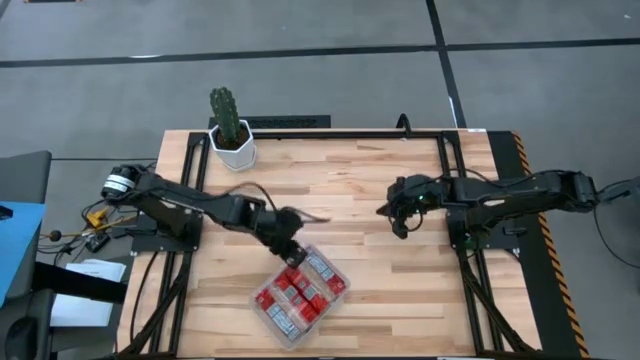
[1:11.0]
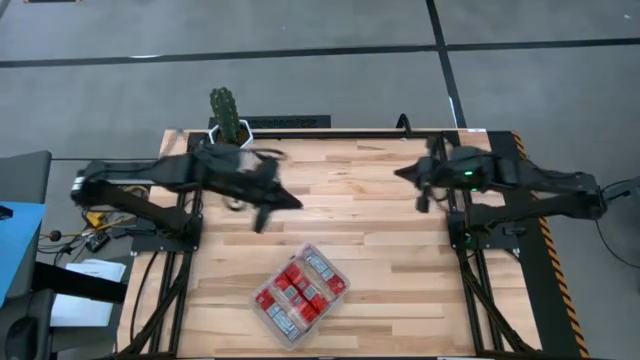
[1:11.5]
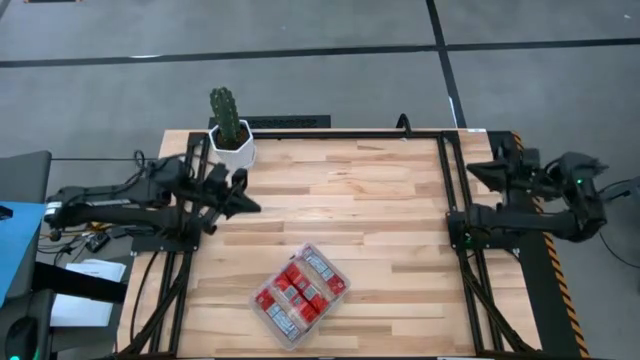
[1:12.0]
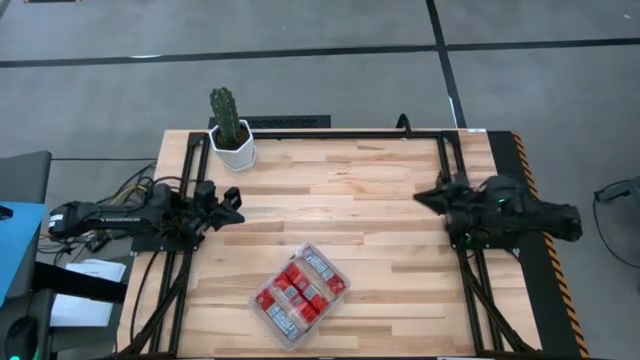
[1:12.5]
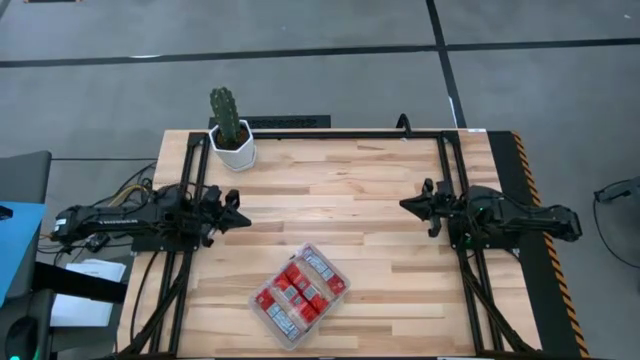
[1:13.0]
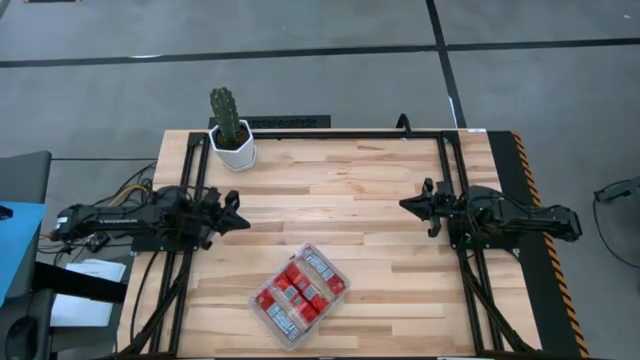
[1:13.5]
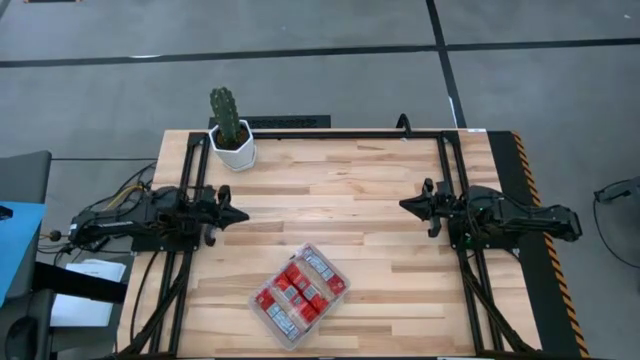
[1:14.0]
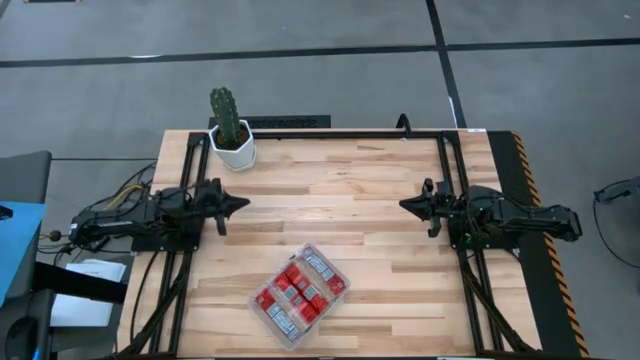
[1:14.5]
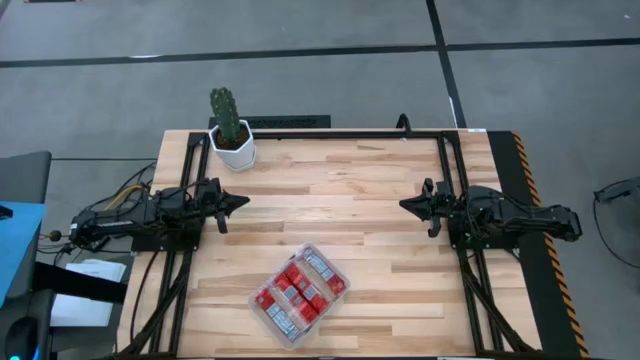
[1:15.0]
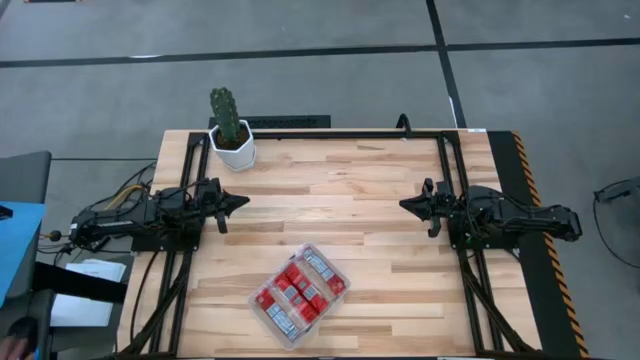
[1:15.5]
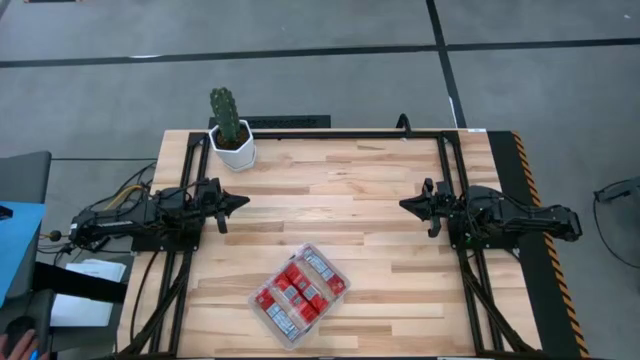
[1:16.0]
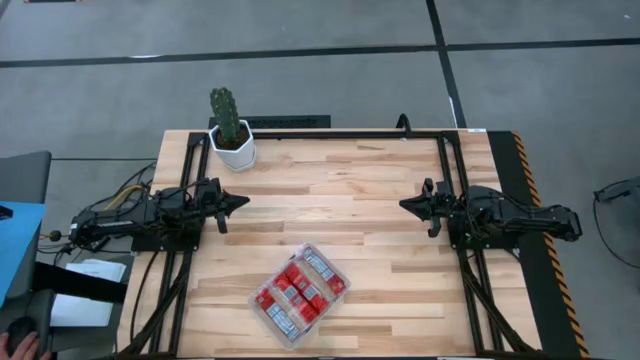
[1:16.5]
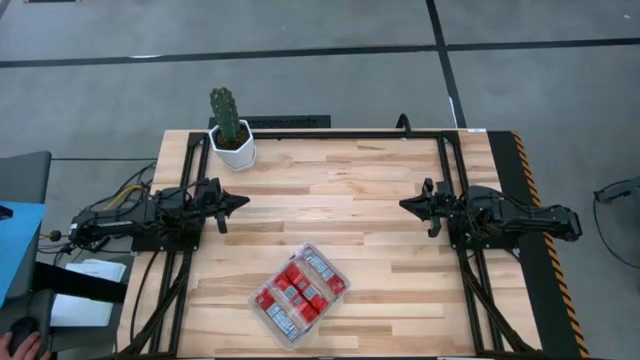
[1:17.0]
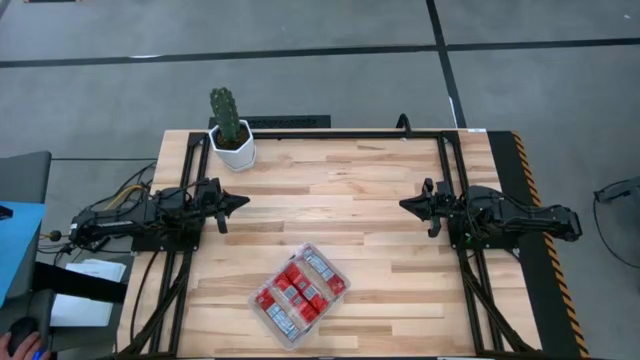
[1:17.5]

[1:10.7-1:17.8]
Task: Sort popcorn bags into baskets
Return to Home Position

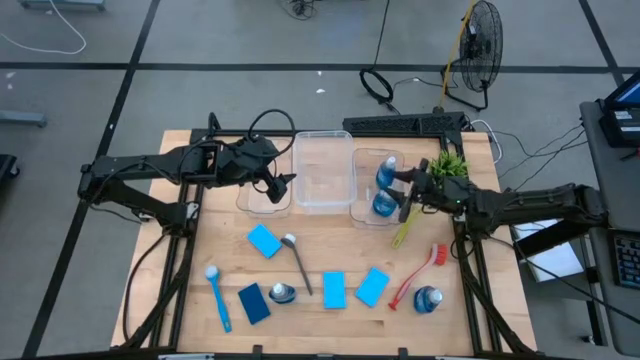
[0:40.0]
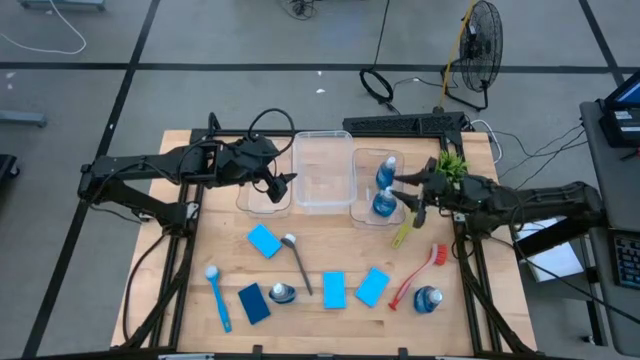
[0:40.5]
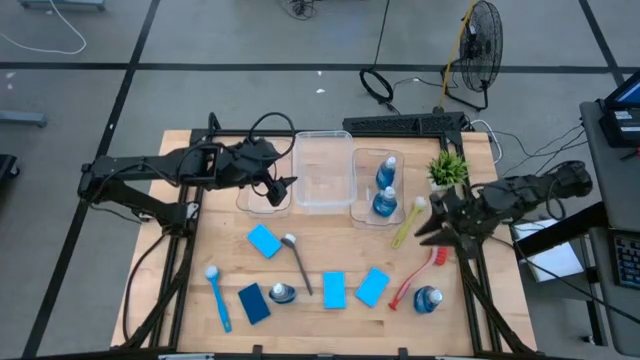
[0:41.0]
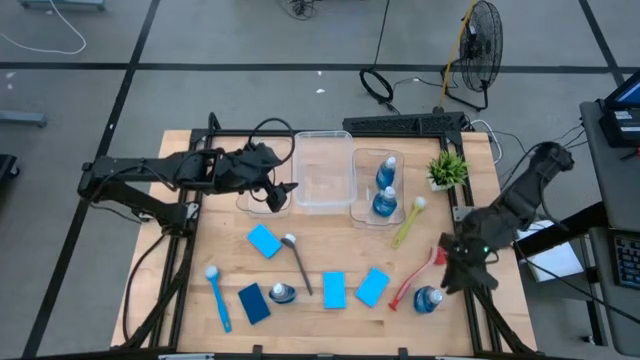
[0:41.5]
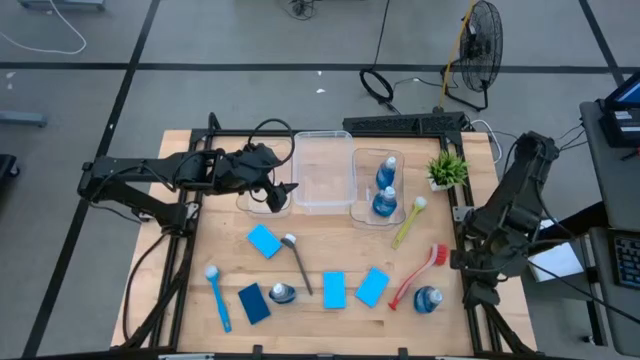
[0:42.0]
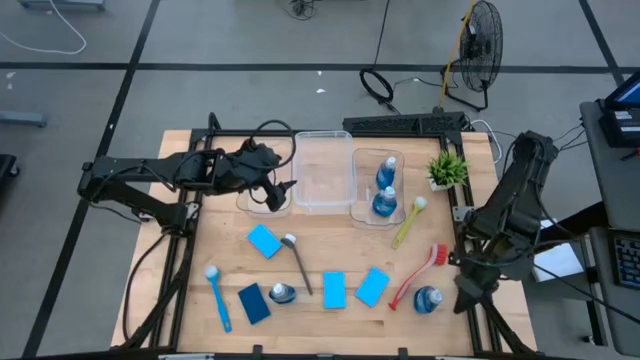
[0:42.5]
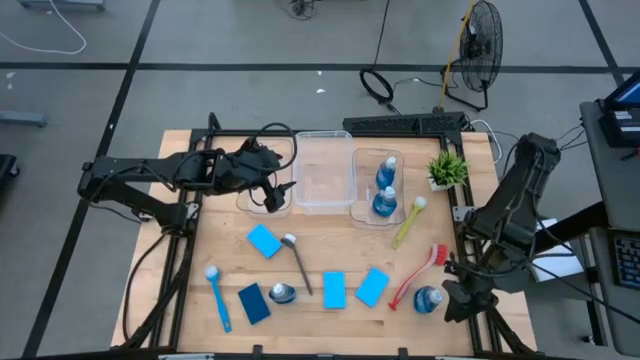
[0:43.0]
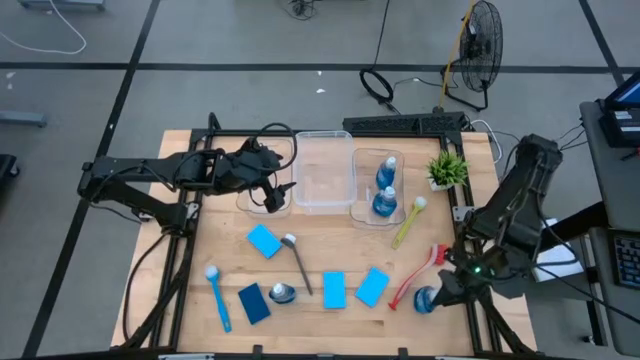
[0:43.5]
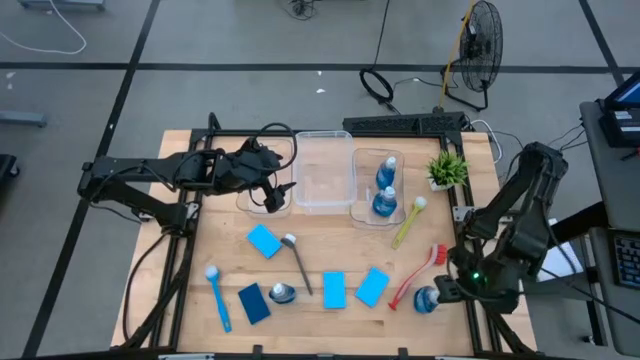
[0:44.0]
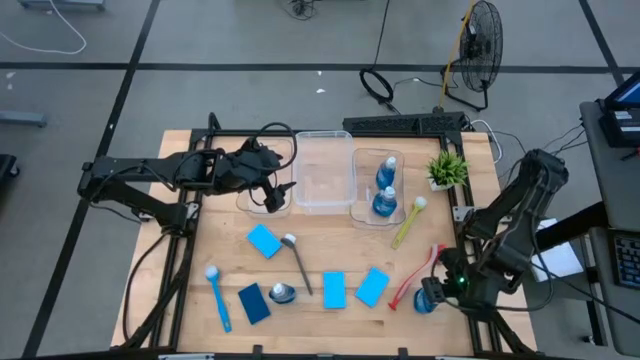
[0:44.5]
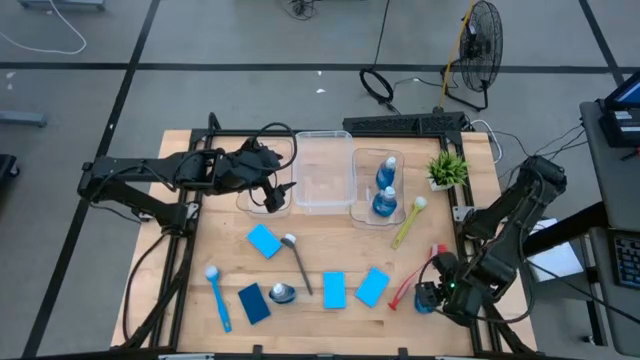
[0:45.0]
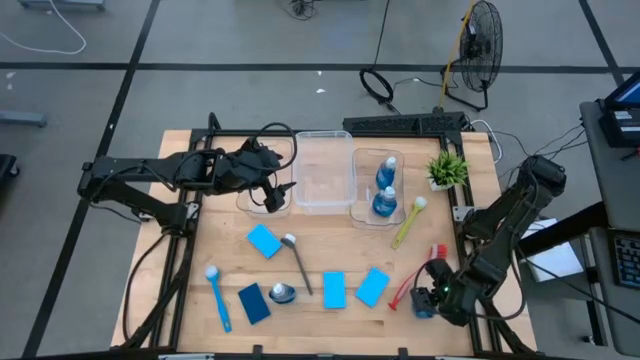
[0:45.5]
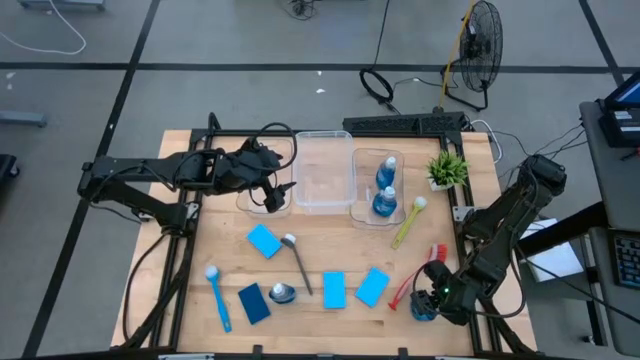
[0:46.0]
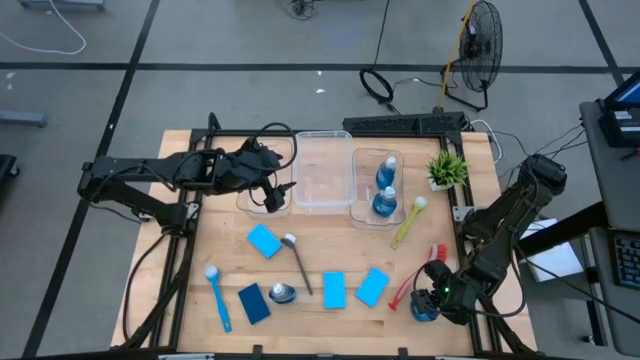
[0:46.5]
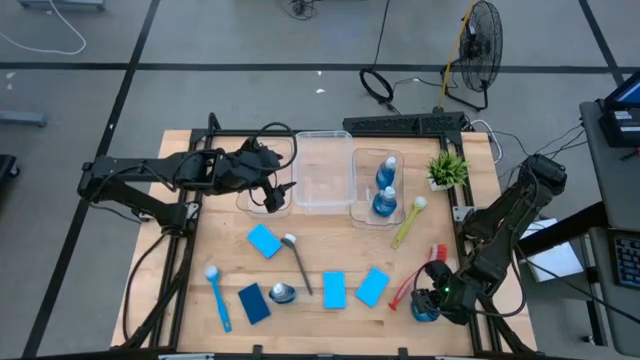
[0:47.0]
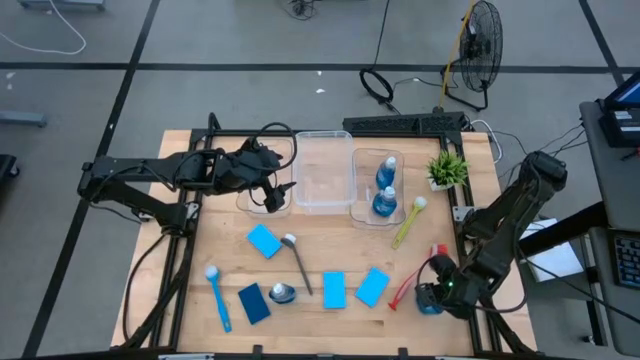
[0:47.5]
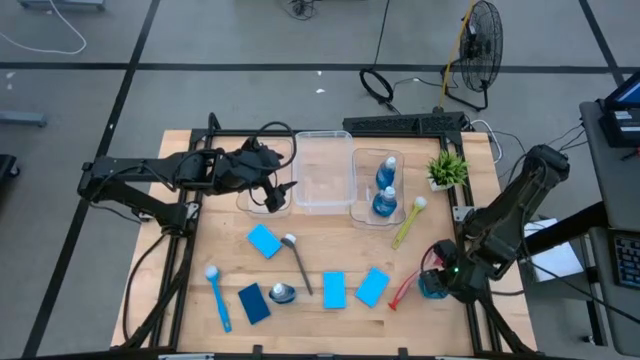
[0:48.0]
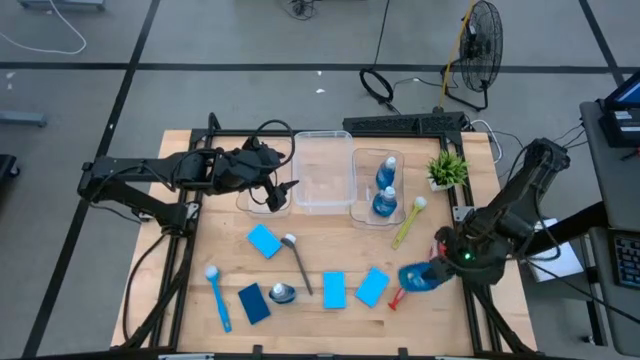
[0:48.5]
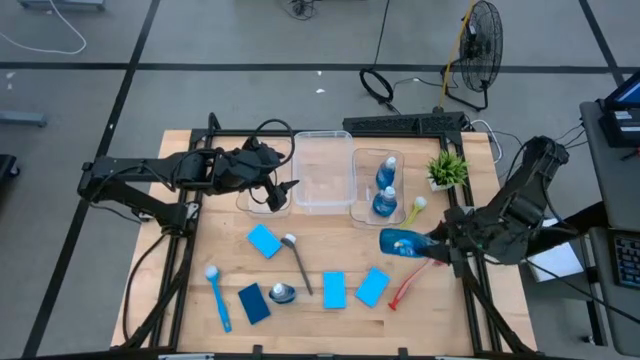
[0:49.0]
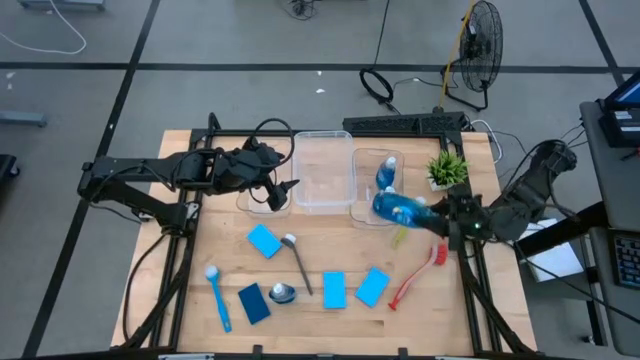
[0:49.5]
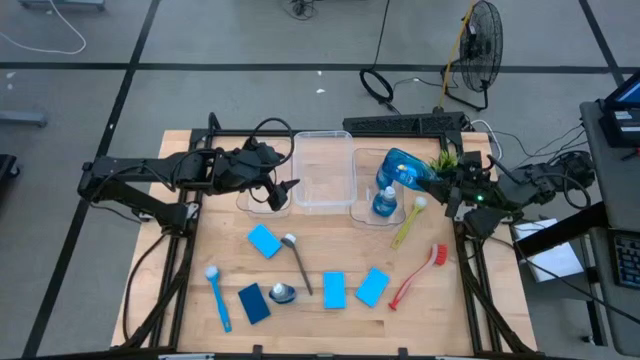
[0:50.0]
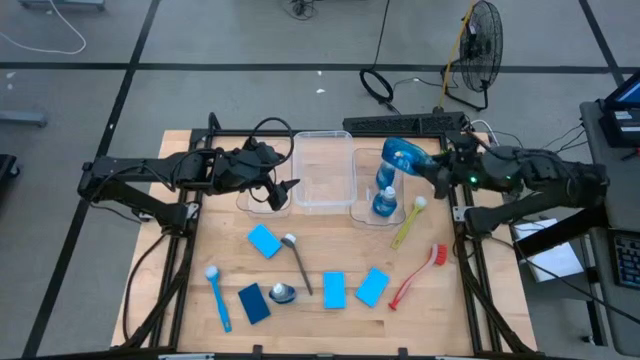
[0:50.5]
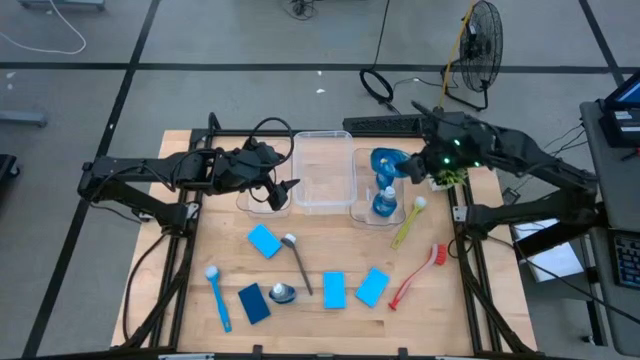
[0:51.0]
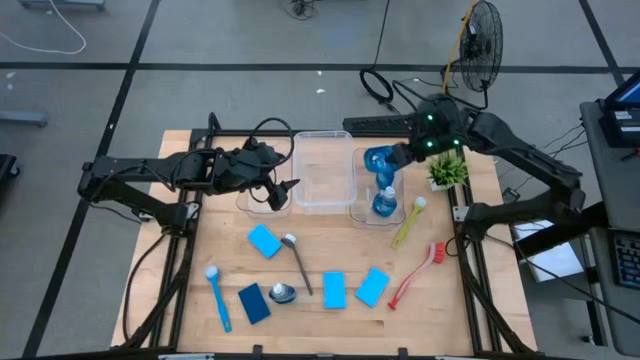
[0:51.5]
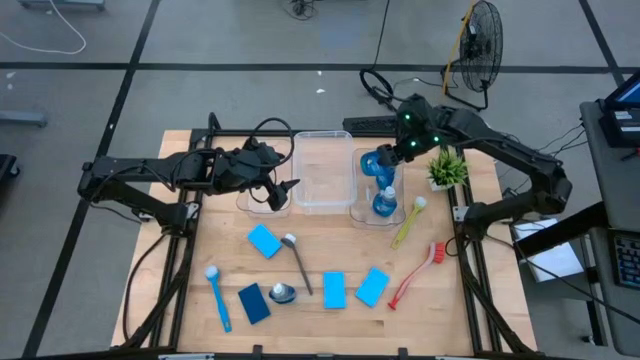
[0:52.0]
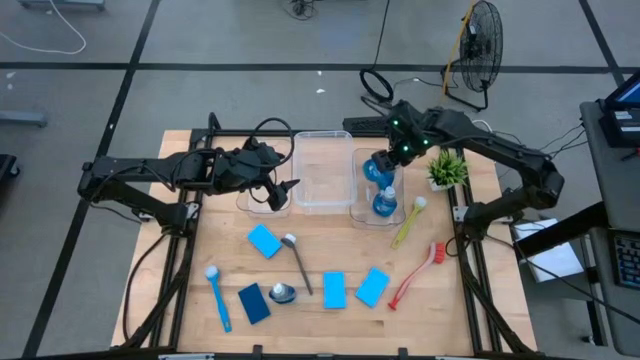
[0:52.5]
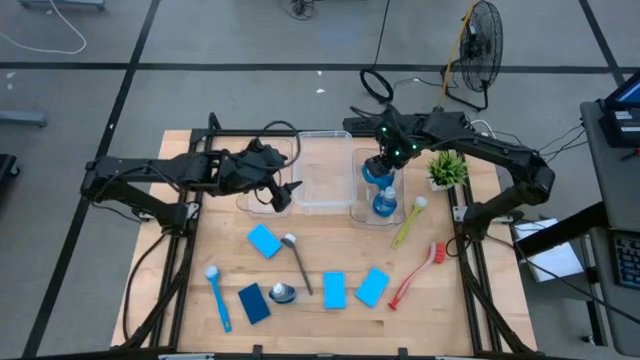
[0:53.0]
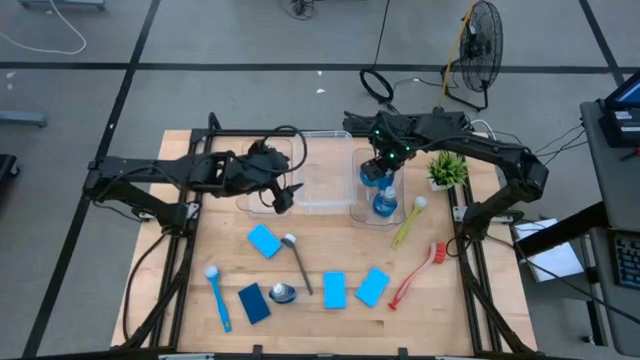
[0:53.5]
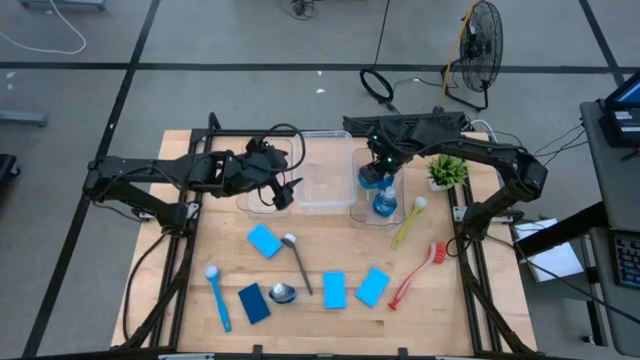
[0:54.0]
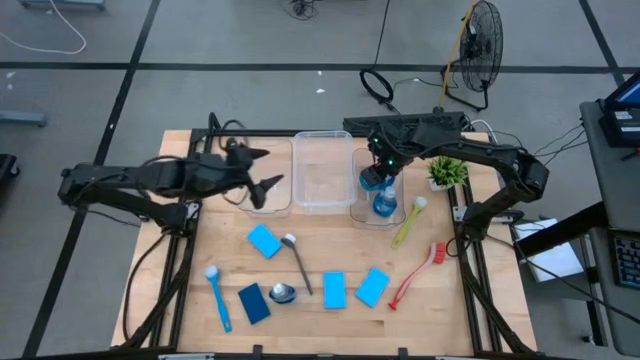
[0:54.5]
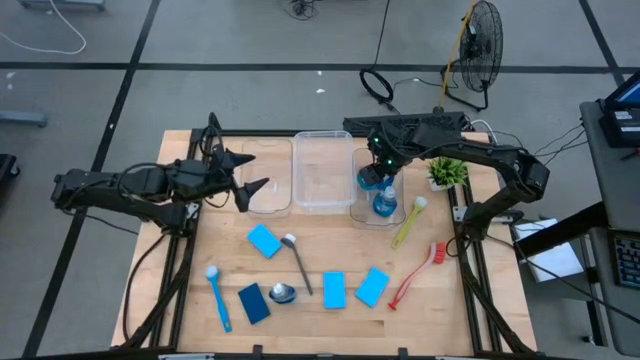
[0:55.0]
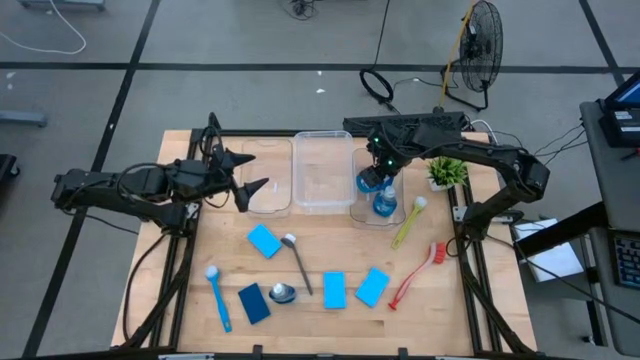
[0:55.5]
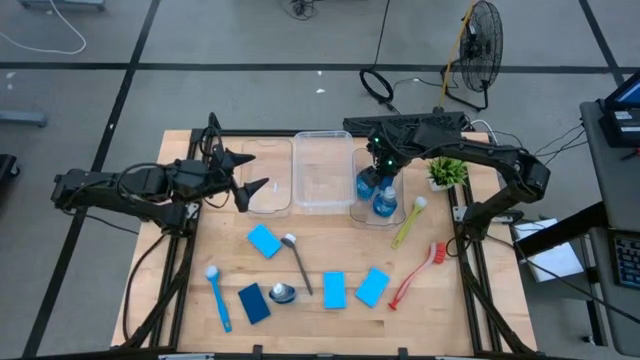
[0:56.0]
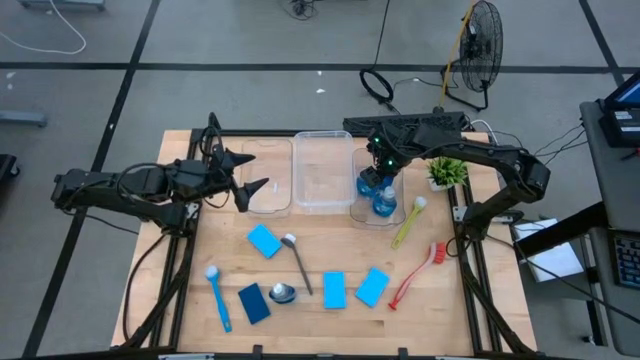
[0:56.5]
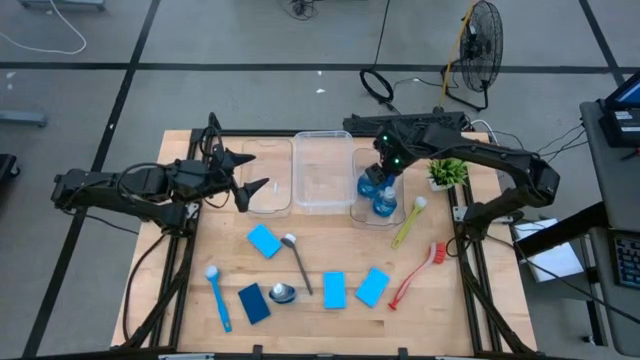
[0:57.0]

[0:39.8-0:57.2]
Task: Pick & Place Kitchen Sink Supplies
Put the blue dishwashing liquid bottle into the right transparent bin
